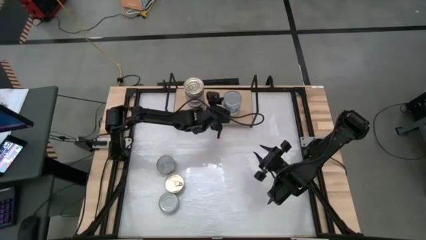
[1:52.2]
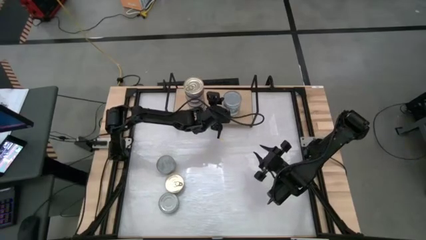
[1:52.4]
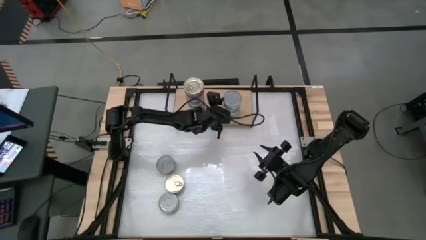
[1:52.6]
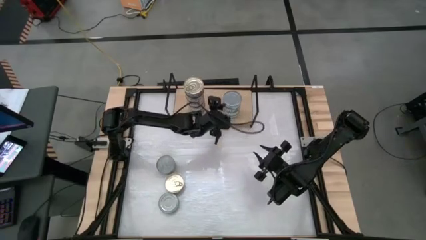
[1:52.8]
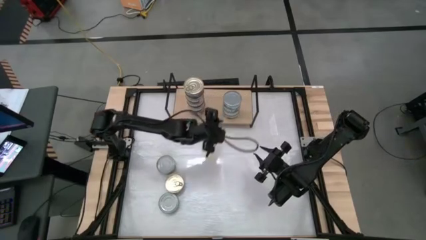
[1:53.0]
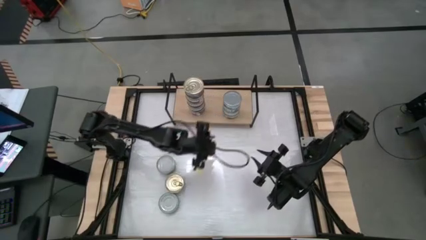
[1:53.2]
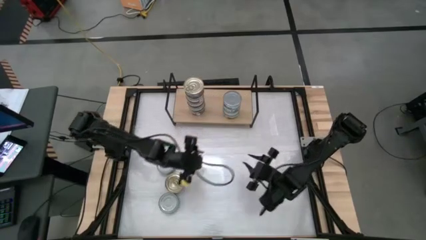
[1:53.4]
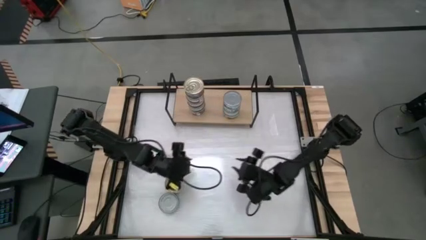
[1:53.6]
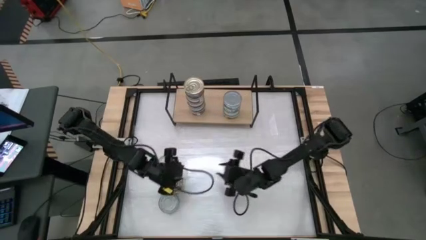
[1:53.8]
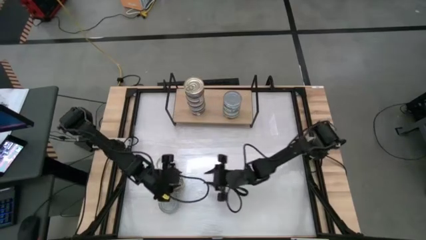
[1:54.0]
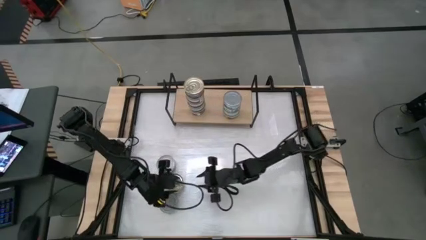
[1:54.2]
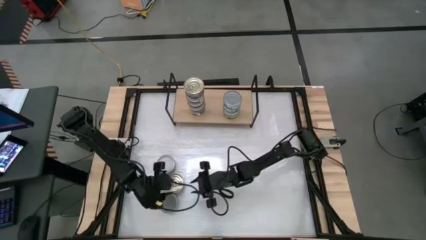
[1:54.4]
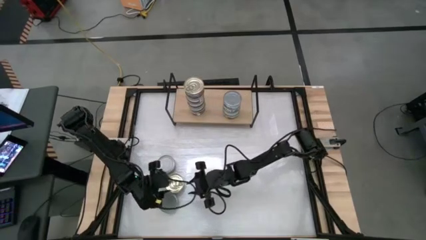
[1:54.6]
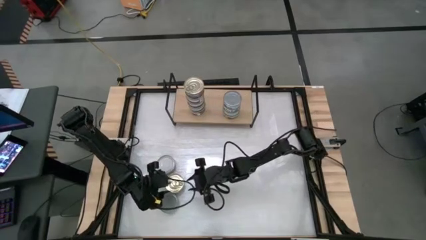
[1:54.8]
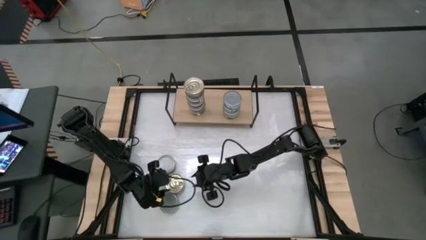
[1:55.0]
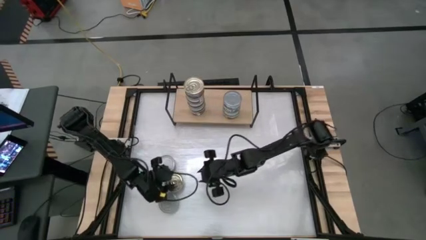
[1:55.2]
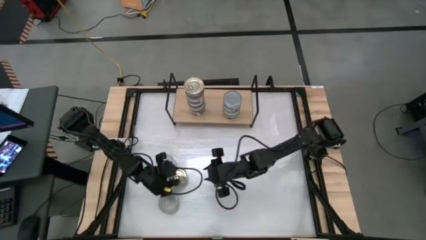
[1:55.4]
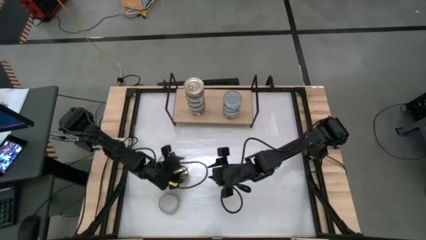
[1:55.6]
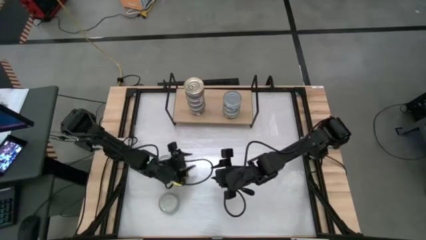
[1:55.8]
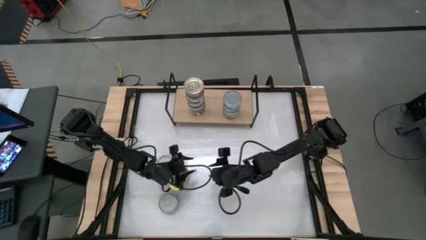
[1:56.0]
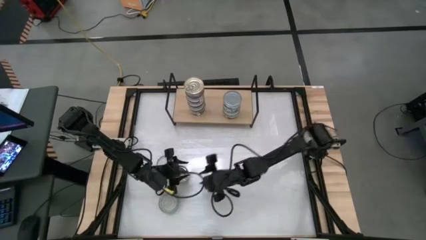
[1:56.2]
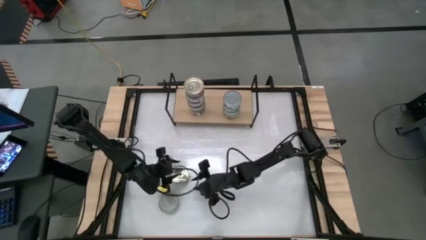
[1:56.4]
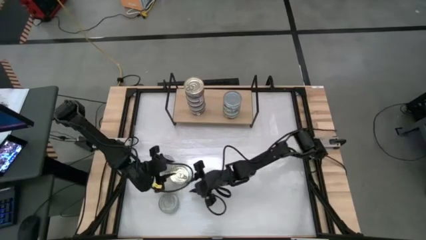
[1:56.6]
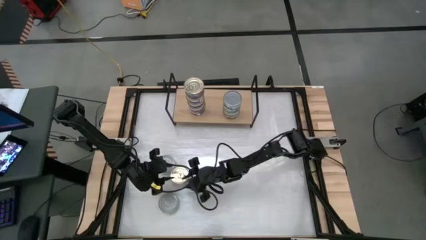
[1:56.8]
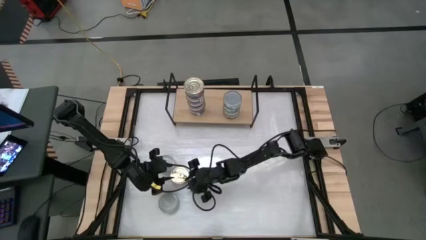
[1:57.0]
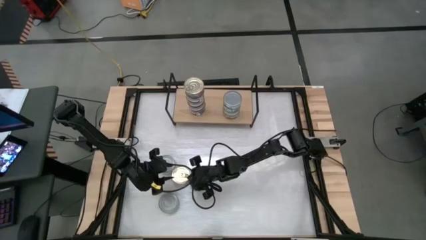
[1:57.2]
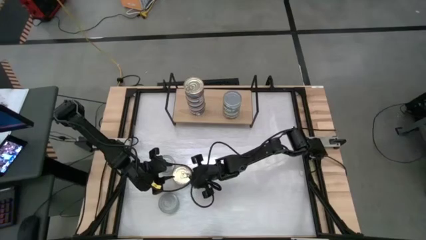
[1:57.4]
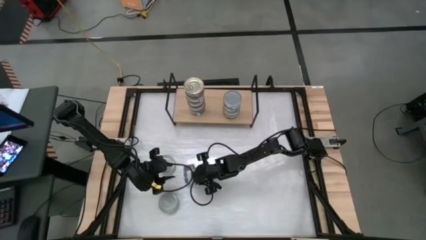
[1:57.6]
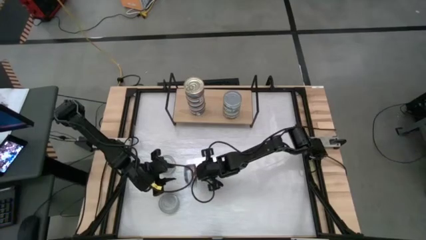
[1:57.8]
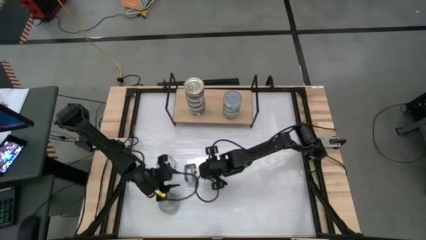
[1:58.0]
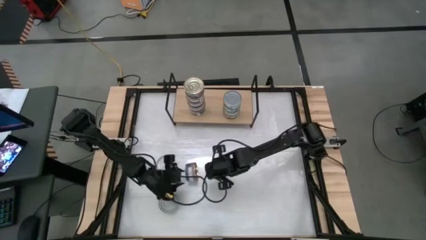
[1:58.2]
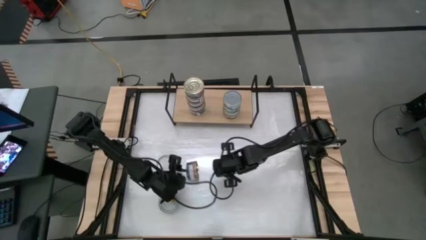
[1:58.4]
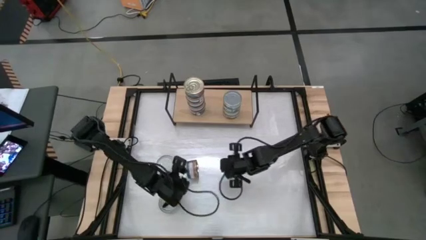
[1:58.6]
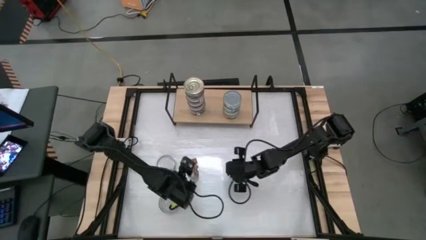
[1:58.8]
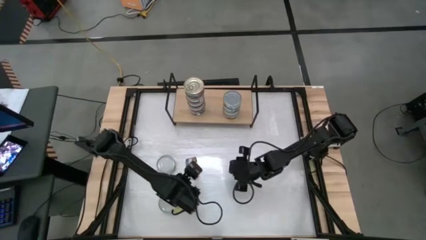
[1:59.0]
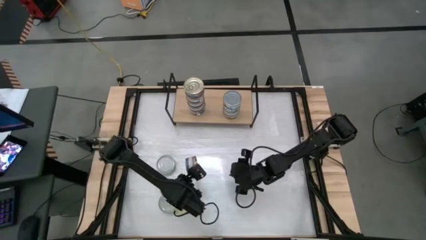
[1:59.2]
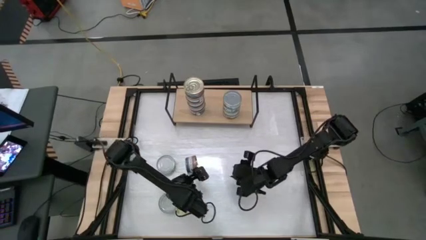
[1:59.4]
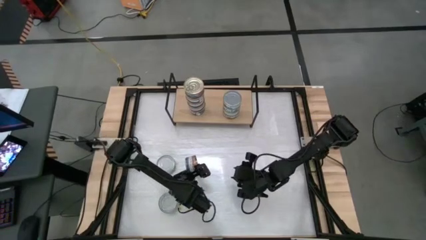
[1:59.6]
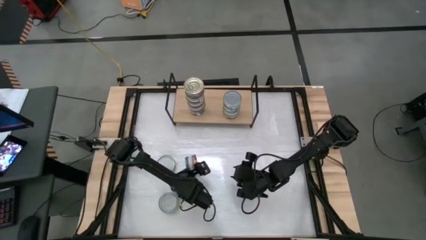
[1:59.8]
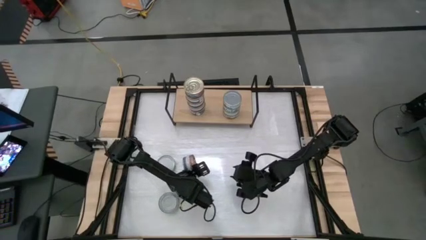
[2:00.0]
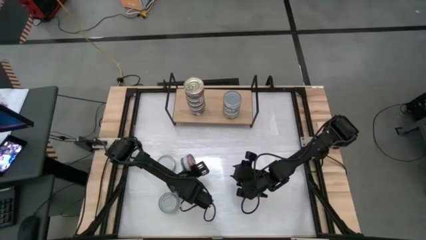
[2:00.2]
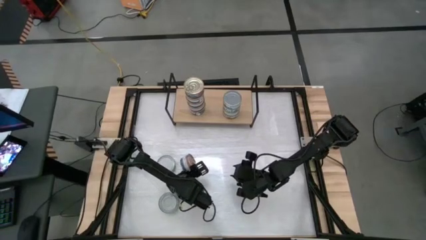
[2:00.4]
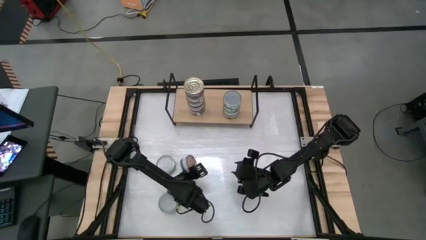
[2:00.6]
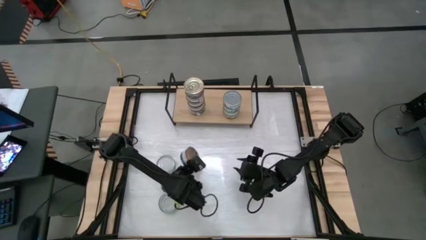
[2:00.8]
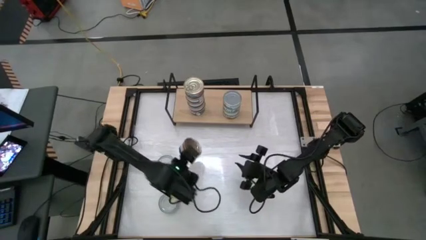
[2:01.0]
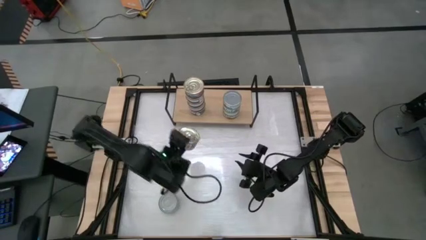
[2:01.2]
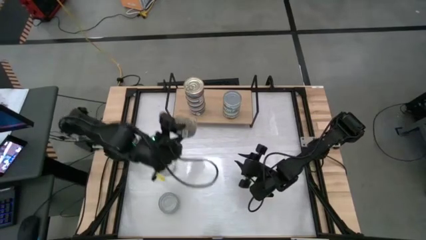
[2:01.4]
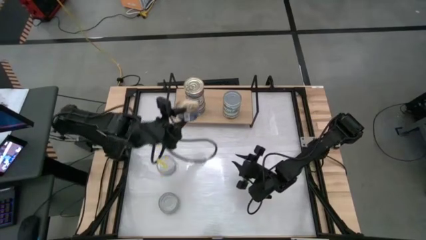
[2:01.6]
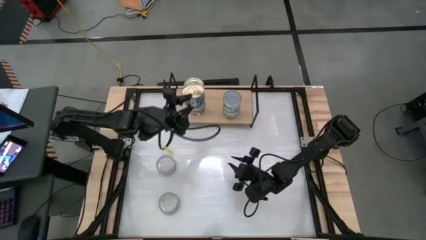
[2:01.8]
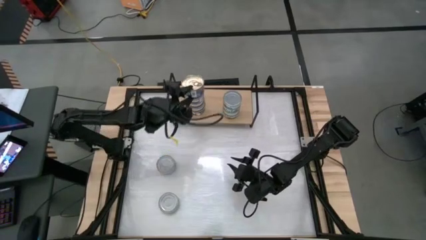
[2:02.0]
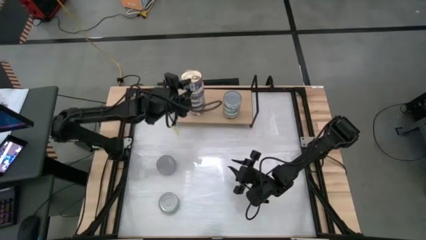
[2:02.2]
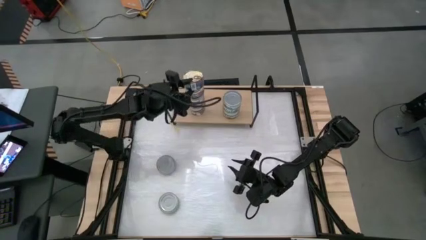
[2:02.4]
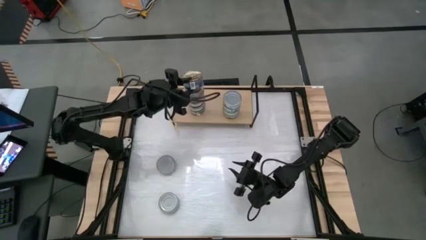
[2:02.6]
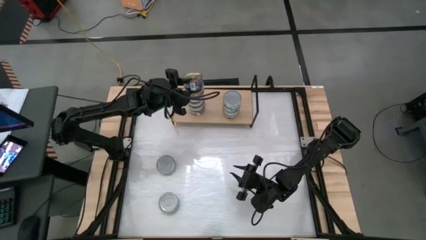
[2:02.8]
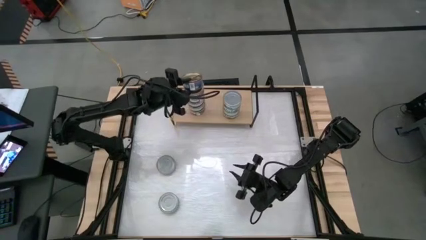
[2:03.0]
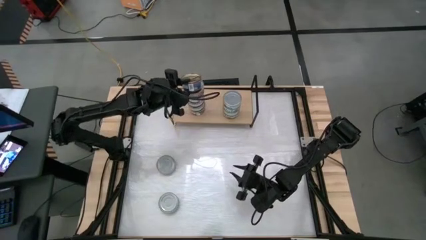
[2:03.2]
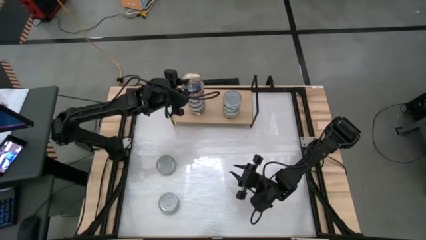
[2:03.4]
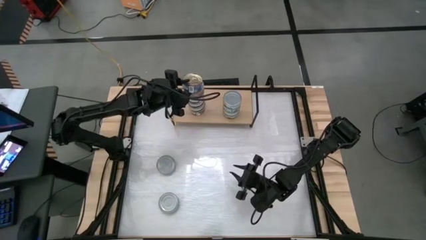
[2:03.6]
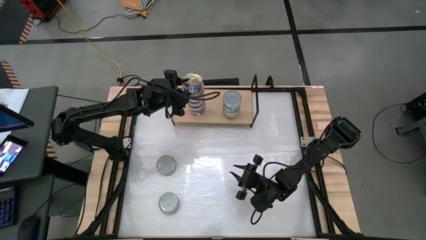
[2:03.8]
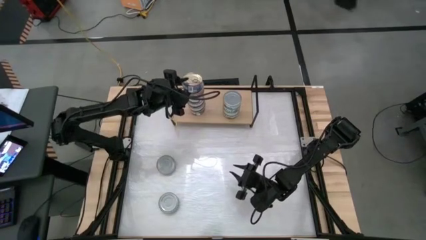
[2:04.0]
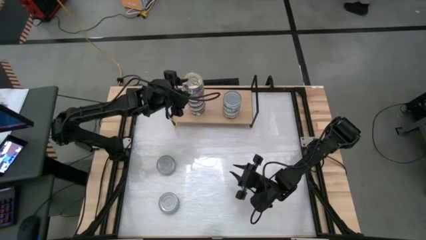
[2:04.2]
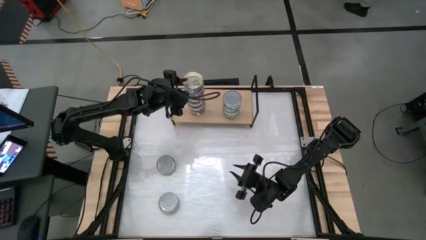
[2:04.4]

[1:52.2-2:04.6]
Task: Stack canned seafood by type on shelf
Stack the blue-pink tuna can on top of the other blue-pink tuna can on the shelf

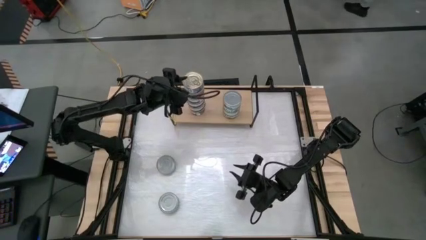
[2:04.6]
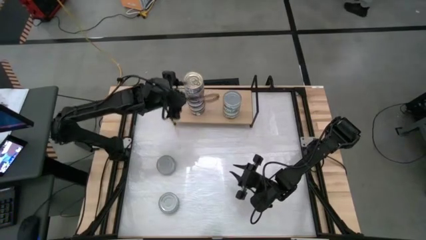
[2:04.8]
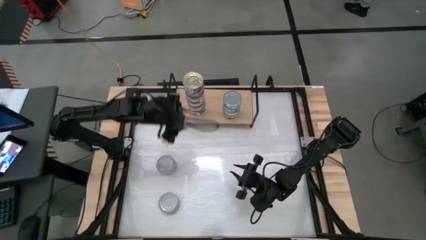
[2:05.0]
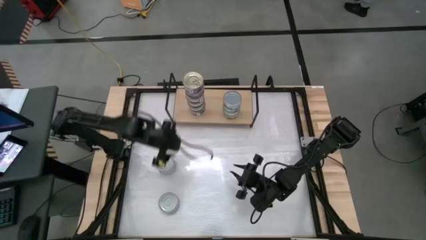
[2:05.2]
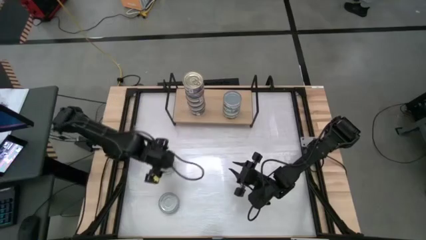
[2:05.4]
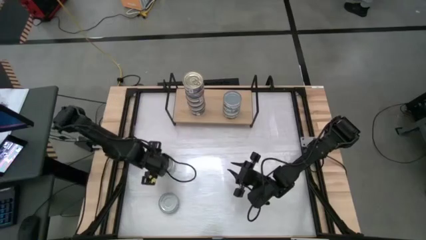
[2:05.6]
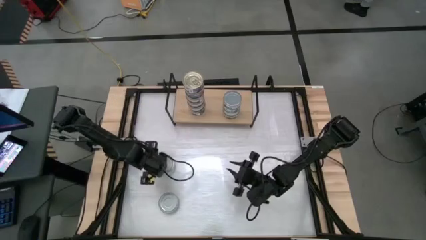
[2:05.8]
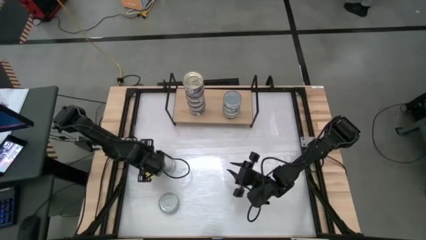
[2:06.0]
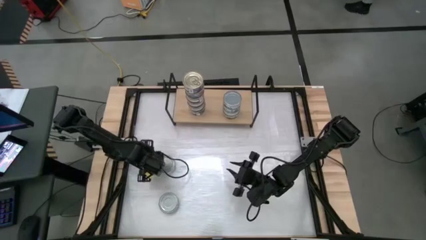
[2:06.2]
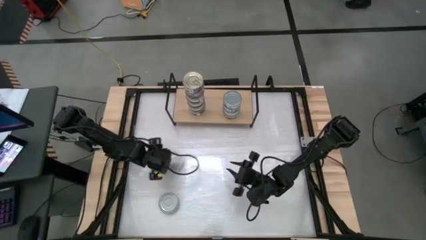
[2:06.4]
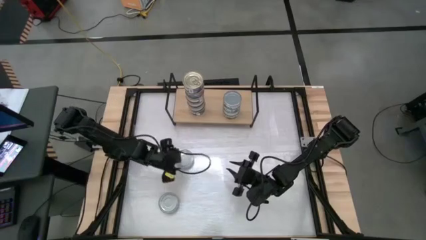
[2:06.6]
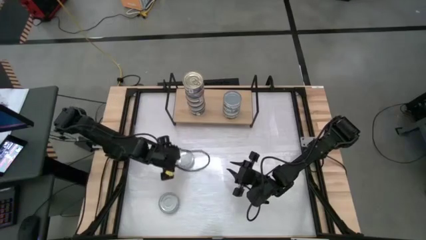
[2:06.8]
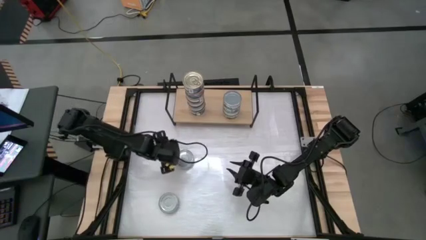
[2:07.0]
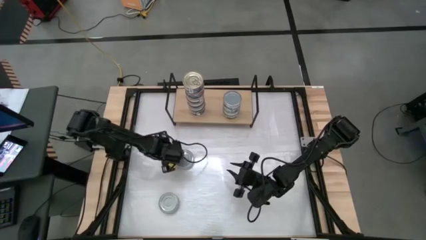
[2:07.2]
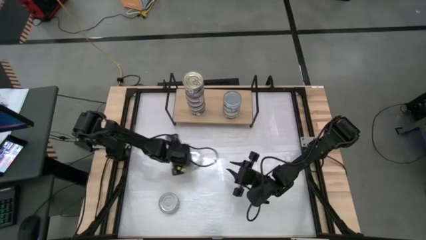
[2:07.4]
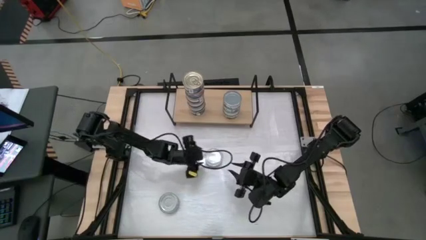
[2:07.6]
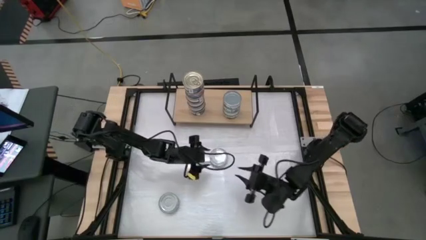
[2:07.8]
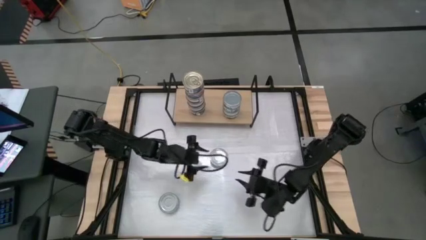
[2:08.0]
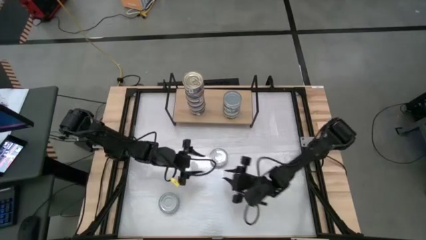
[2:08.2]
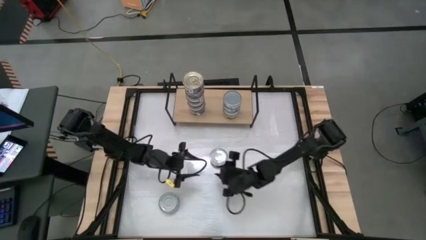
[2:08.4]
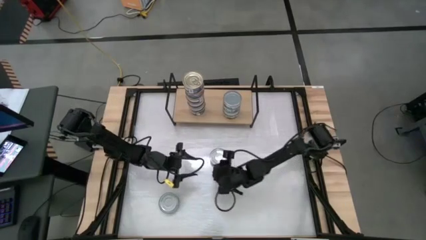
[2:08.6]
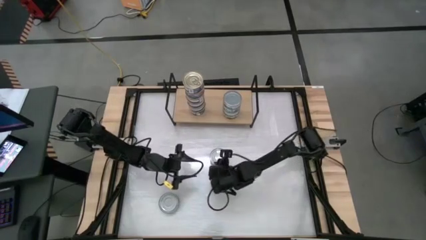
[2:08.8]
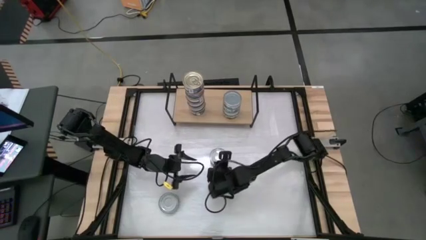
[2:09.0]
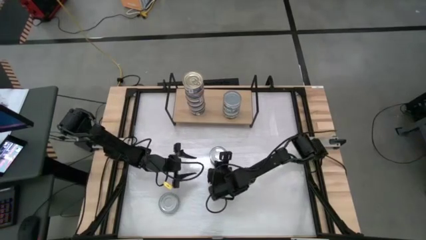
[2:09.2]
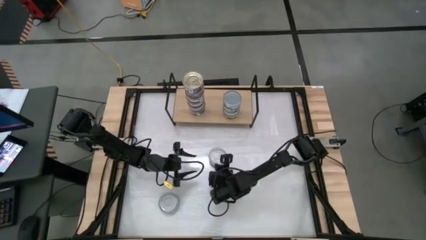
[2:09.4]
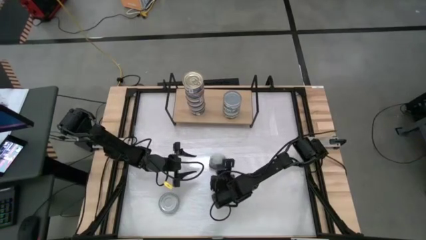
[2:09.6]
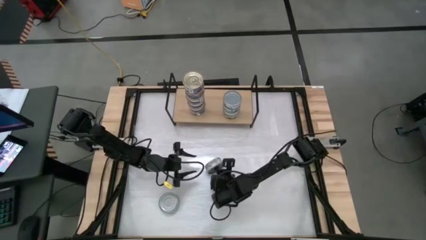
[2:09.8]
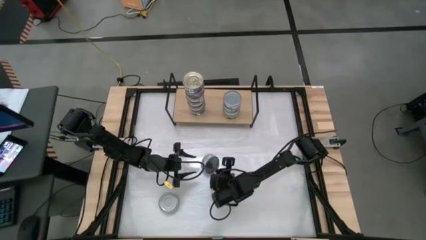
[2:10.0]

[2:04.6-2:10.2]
Stack the green tuna can on top of the other green tuna can on the shelf
